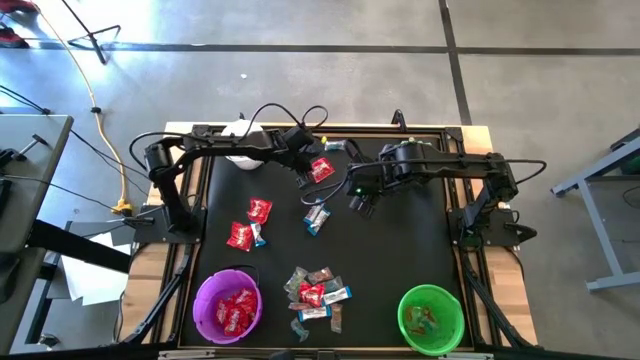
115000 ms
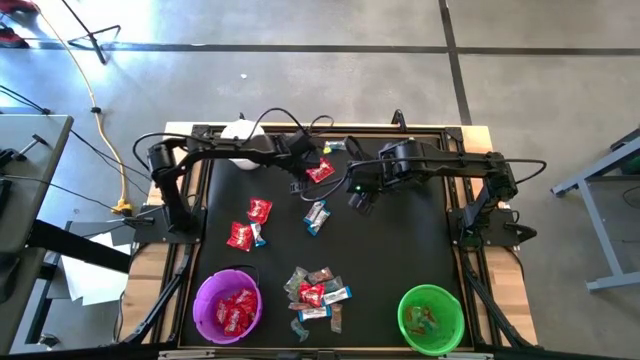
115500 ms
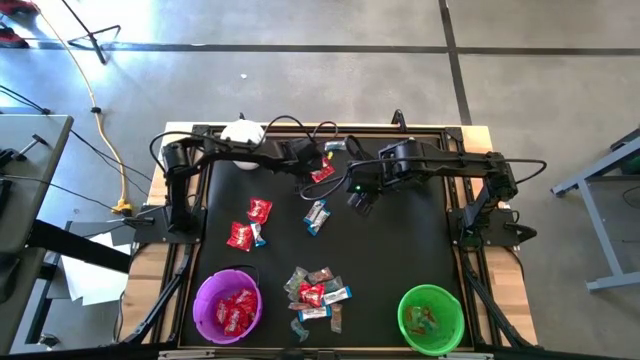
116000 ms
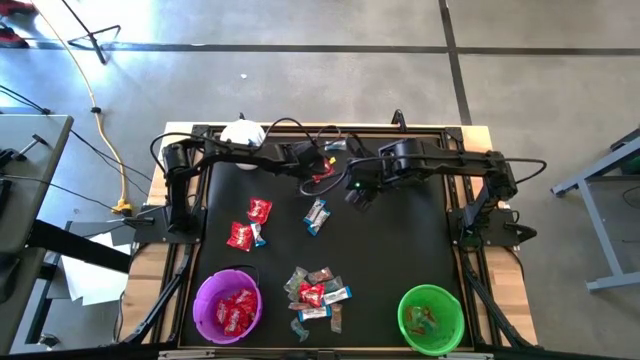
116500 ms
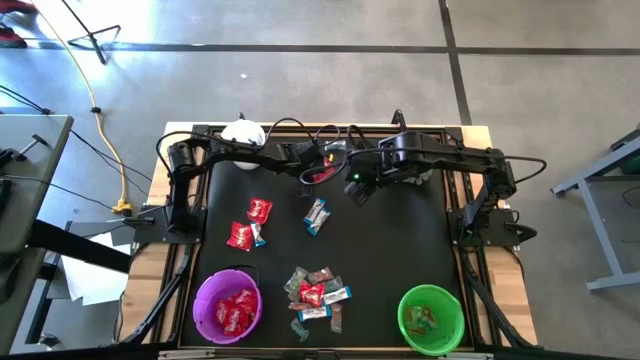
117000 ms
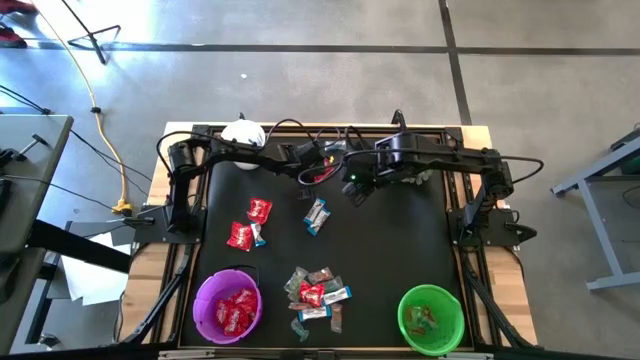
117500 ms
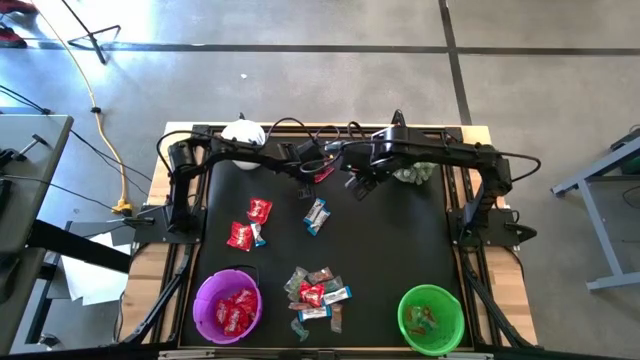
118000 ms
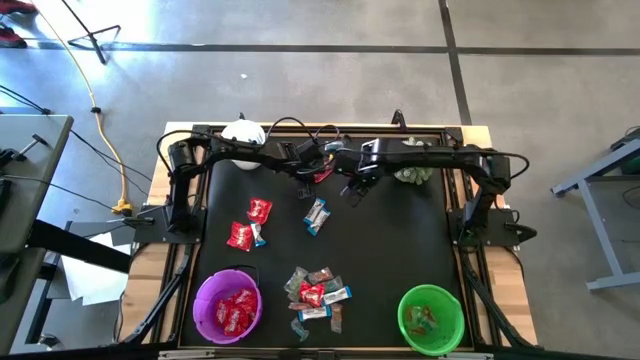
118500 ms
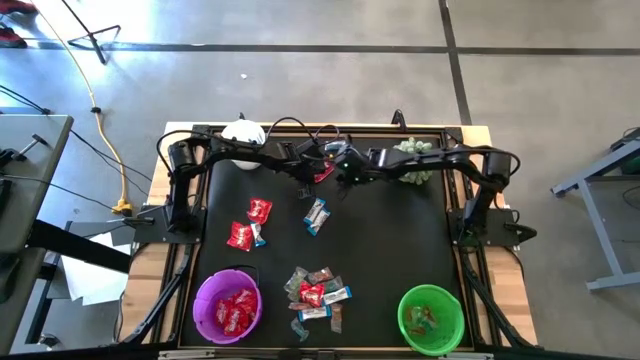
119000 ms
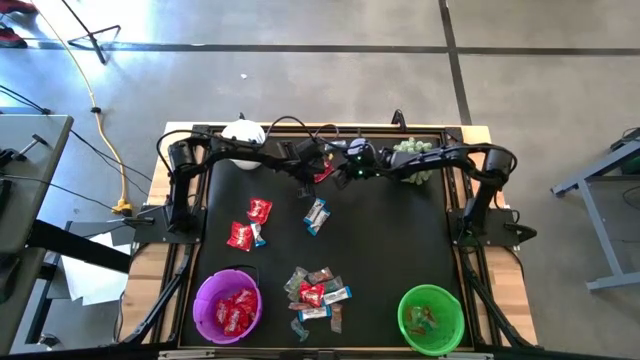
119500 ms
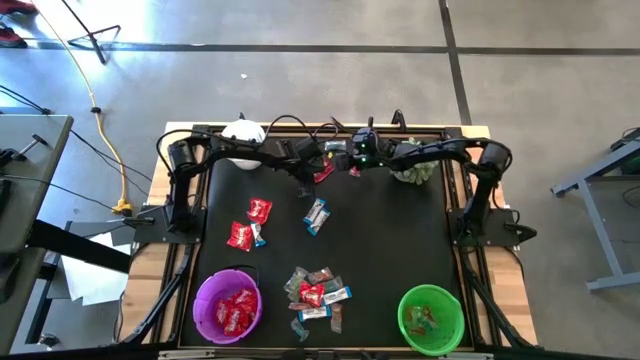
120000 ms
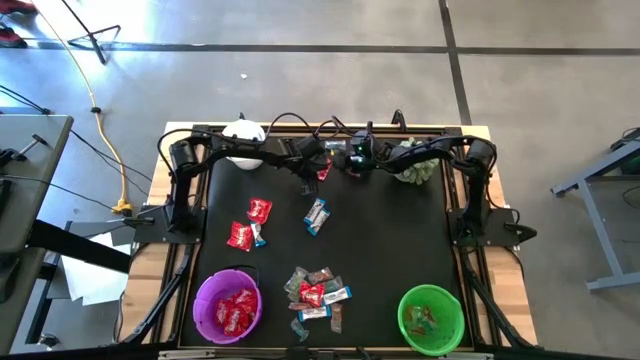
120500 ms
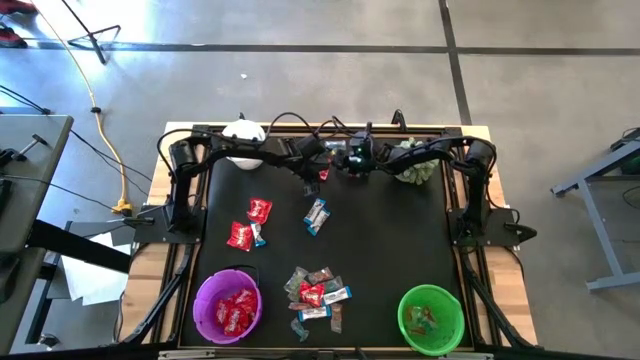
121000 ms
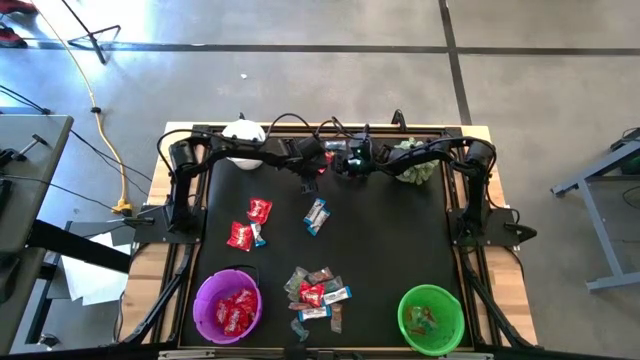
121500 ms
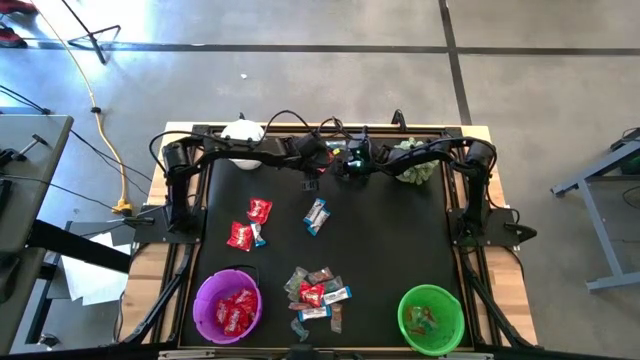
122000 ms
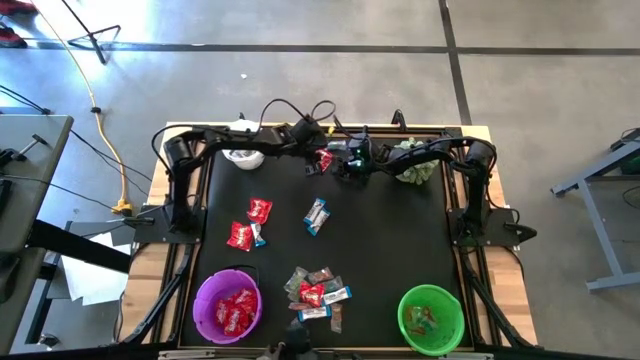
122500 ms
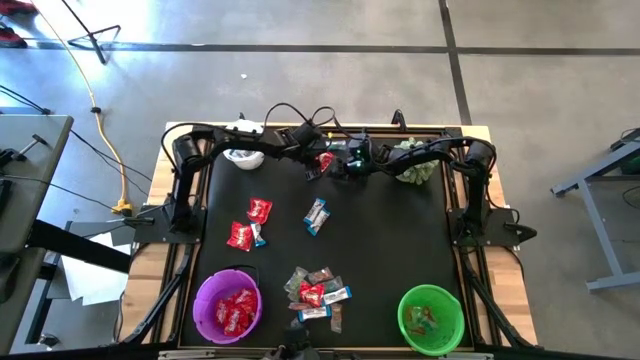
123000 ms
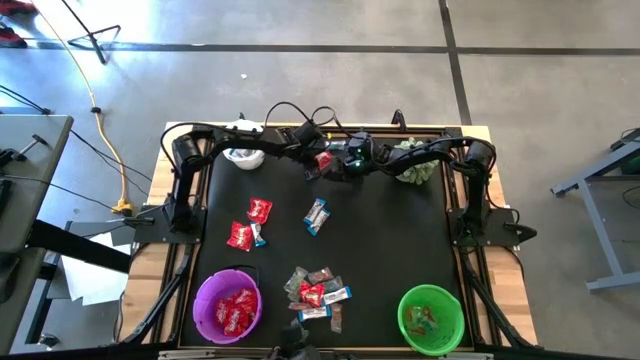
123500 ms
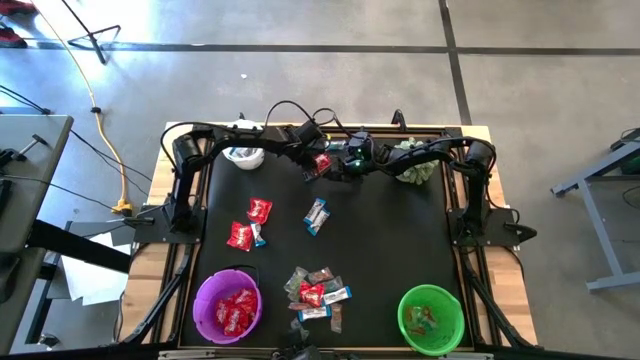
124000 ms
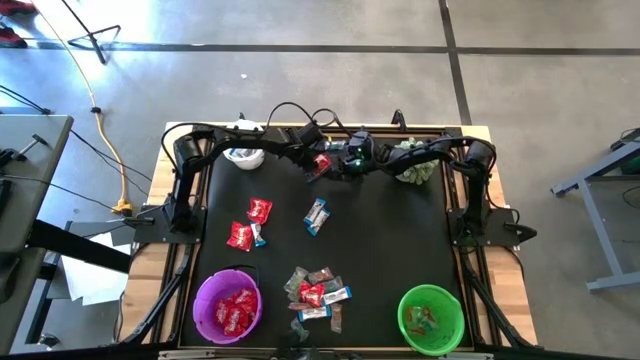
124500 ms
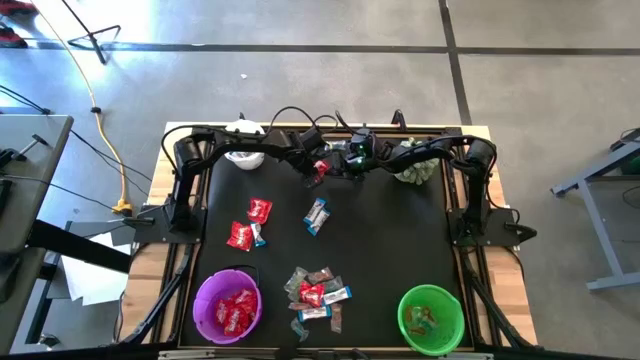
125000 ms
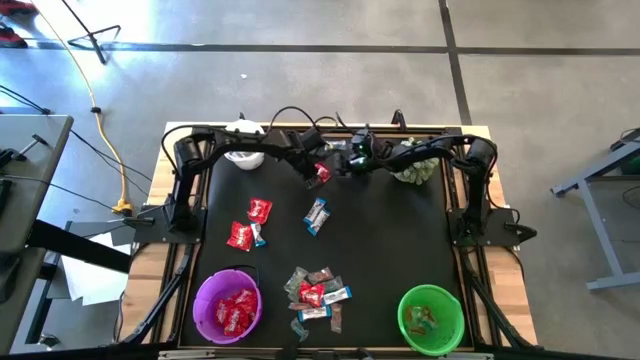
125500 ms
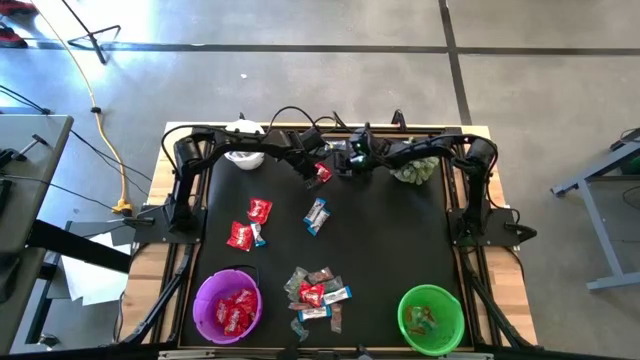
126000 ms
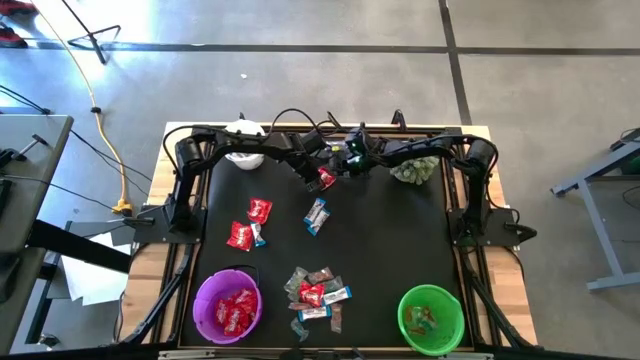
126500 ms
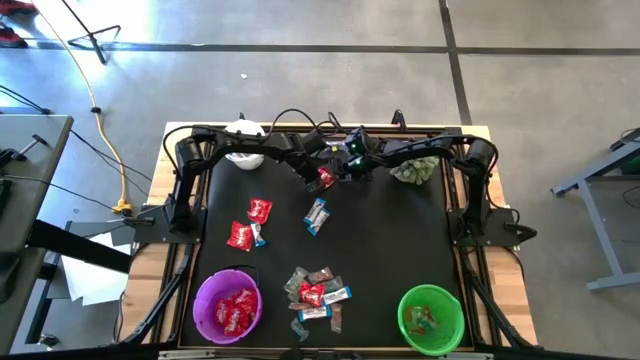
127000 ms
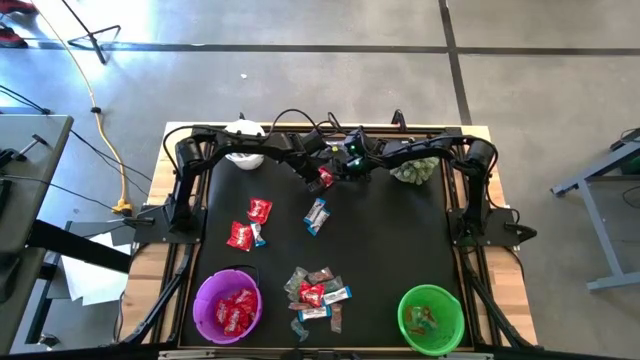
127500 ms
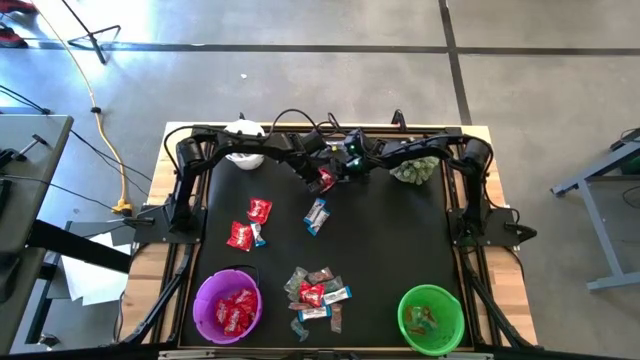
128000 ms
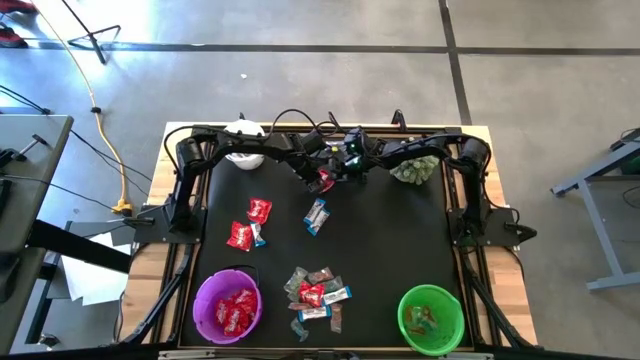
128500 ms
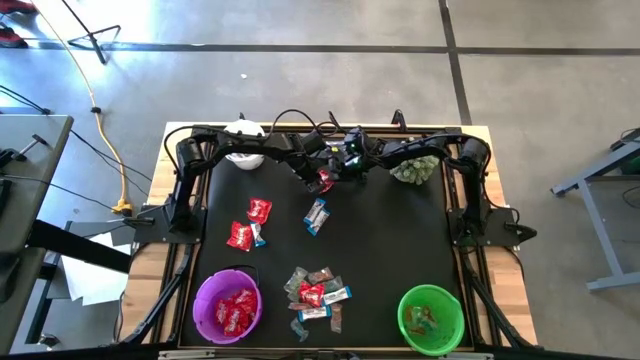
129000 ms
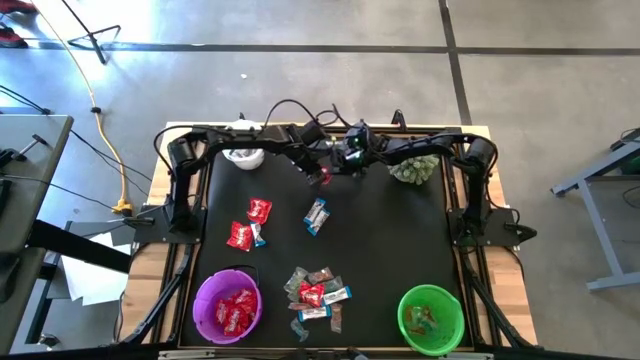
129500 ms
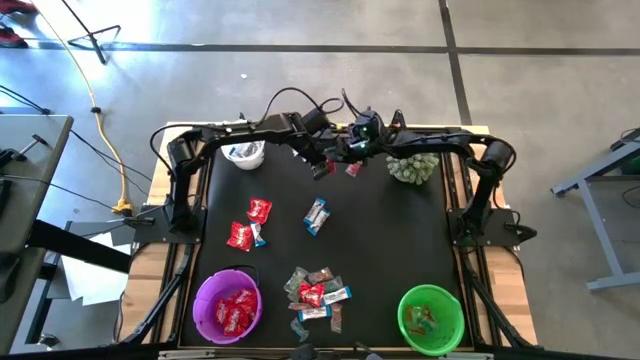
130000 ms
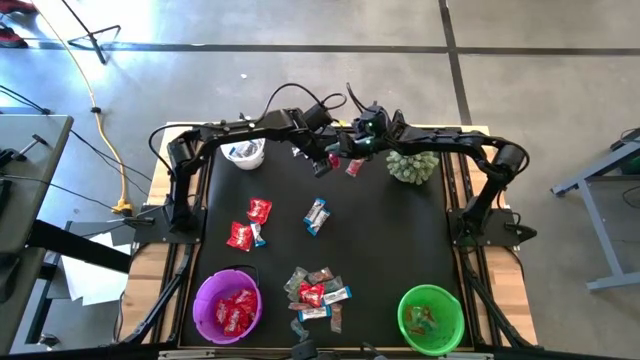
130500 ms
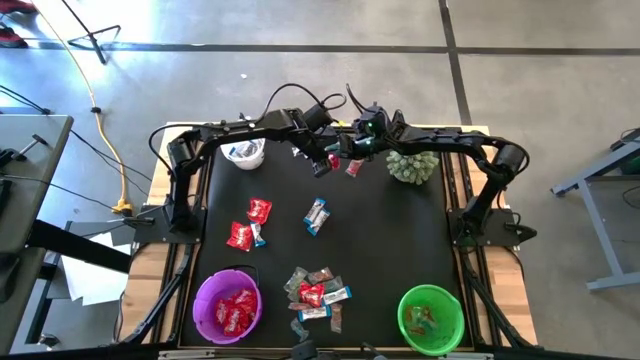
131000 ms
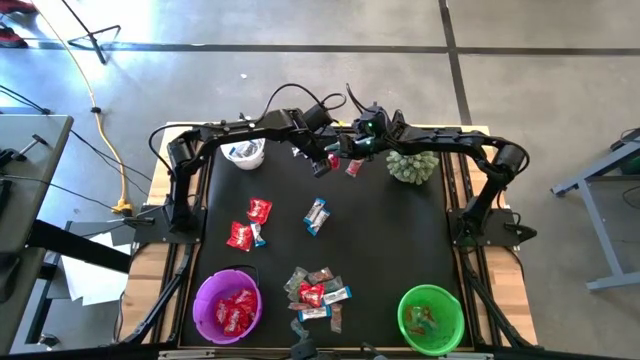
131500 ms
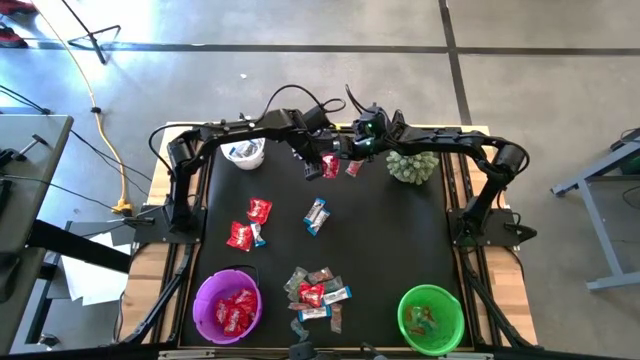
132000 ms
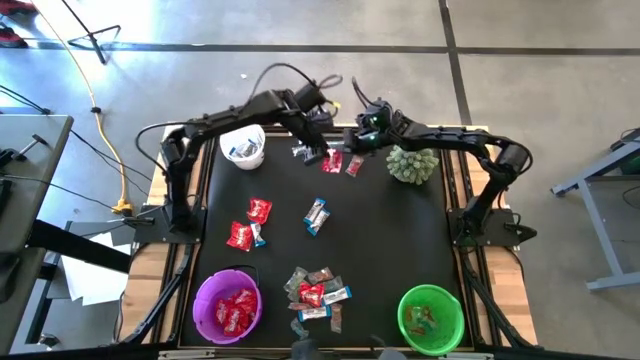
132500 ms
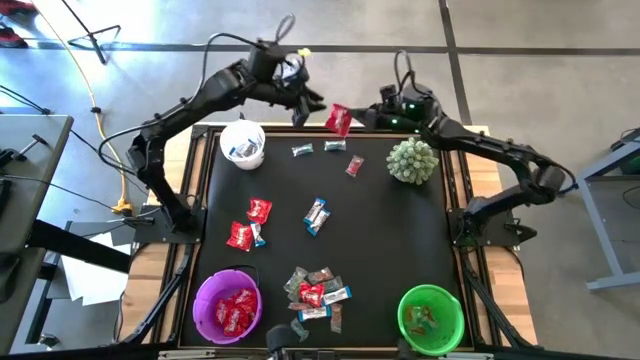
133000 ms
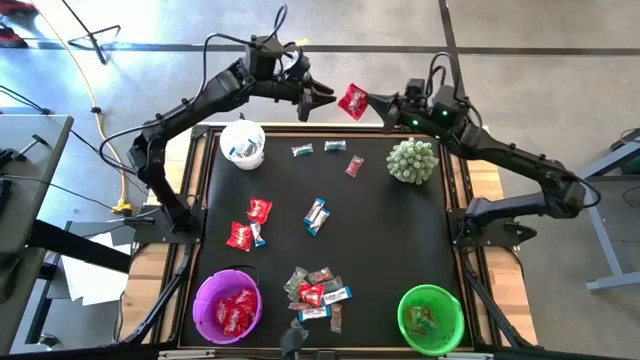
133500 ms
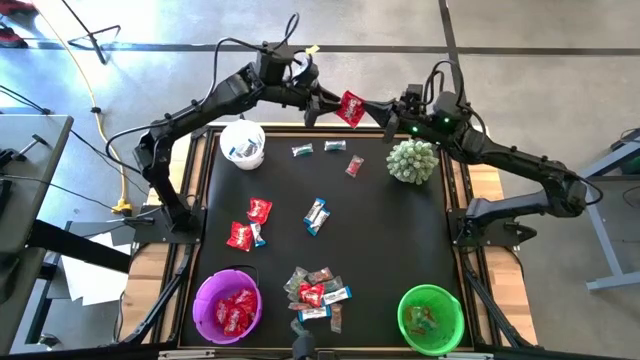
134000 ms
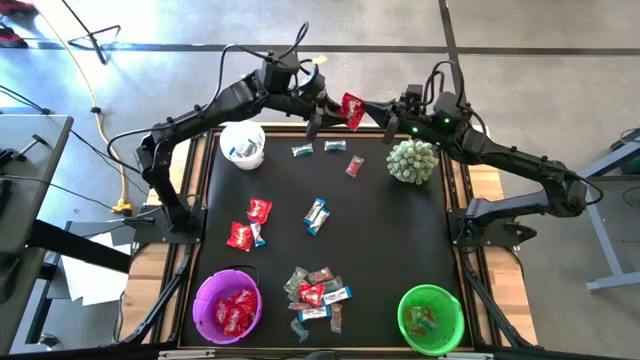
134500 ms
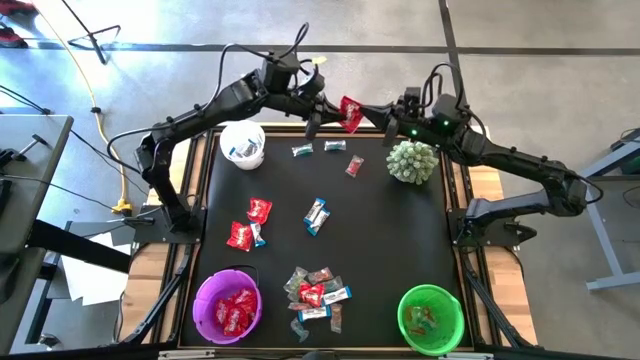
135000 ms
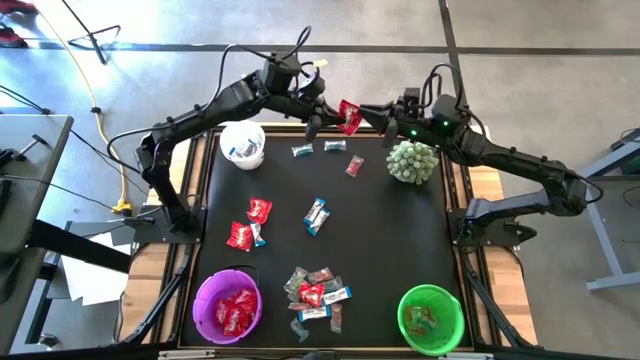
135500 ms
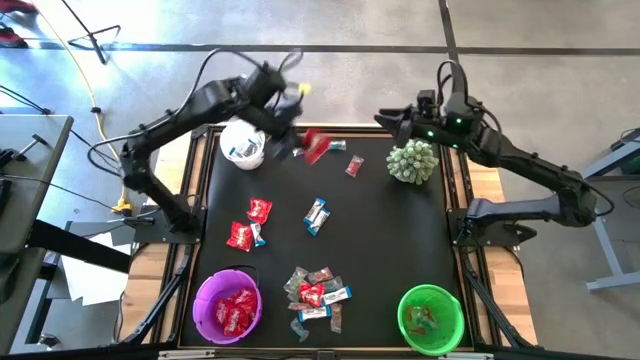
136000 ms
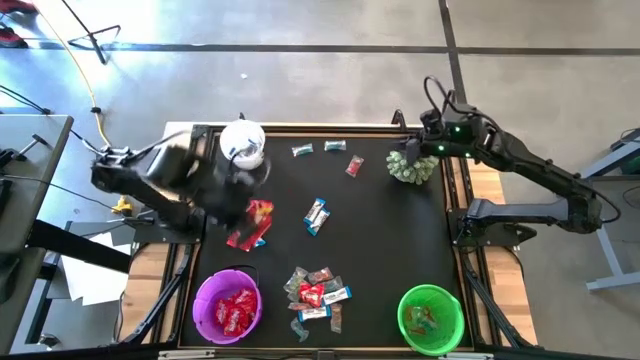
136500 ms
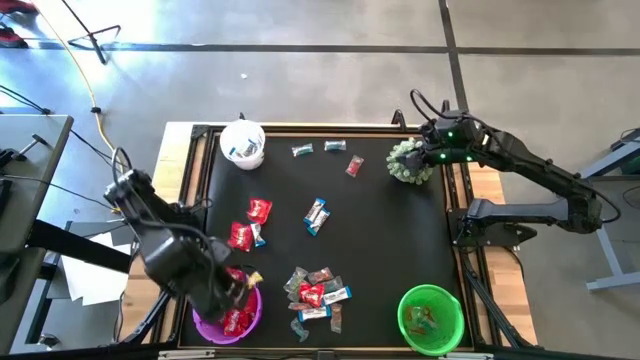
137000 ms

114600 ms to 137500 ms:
Task: Sort candy
Put the red candy into the violet bucket
